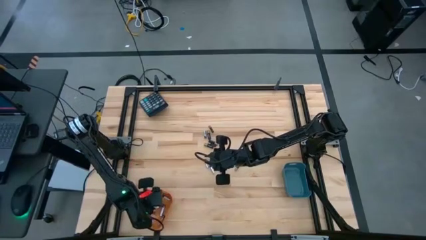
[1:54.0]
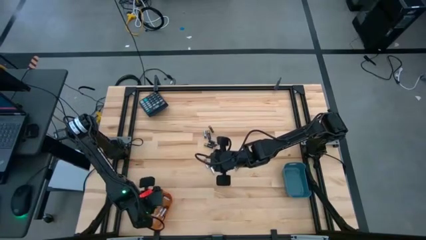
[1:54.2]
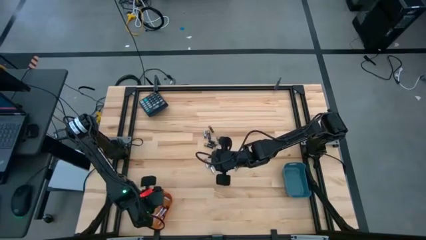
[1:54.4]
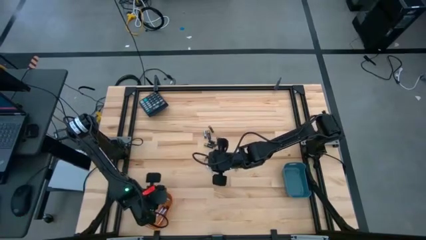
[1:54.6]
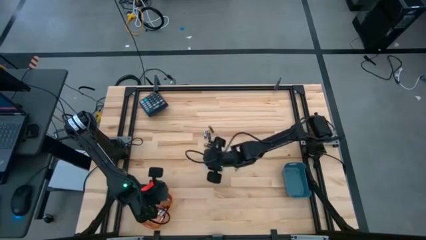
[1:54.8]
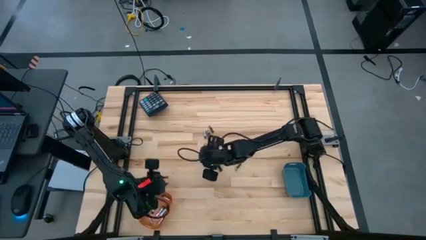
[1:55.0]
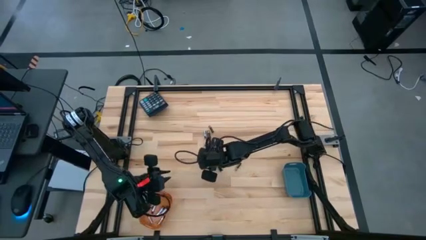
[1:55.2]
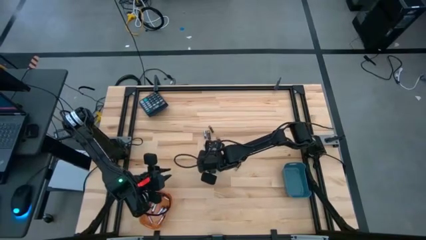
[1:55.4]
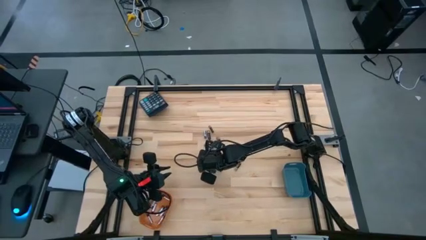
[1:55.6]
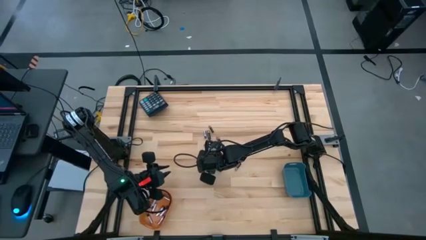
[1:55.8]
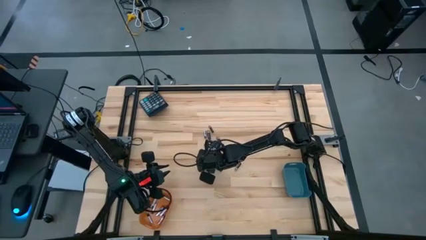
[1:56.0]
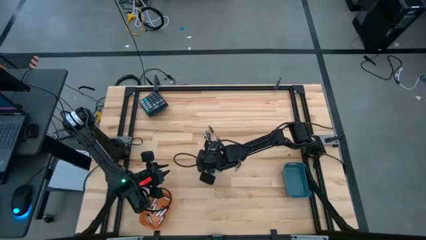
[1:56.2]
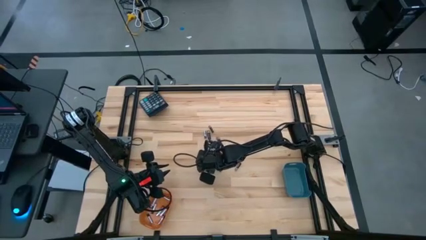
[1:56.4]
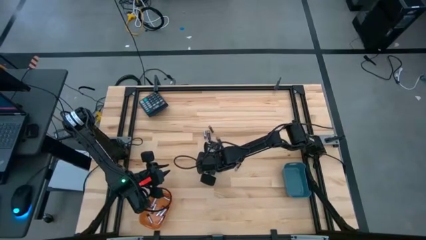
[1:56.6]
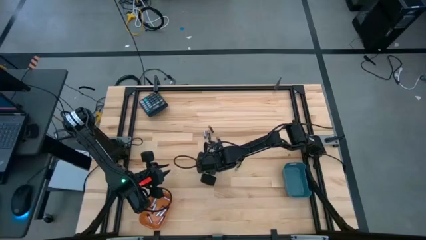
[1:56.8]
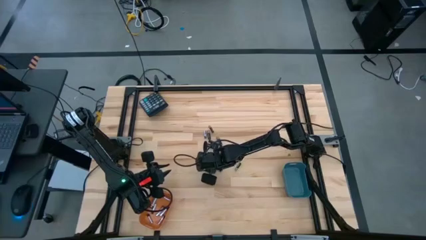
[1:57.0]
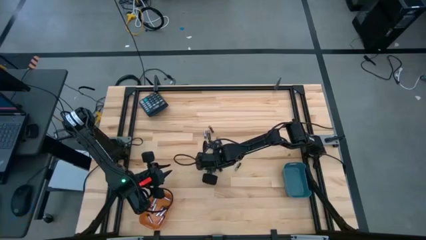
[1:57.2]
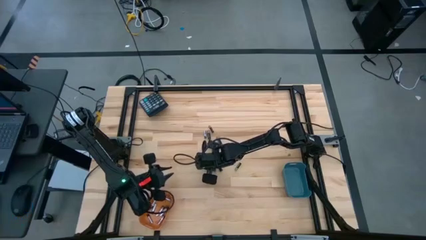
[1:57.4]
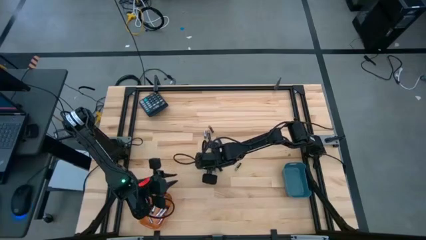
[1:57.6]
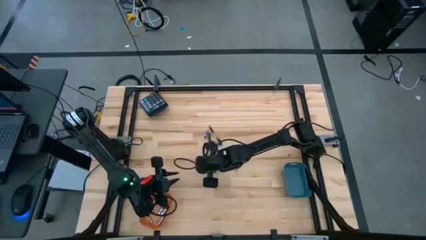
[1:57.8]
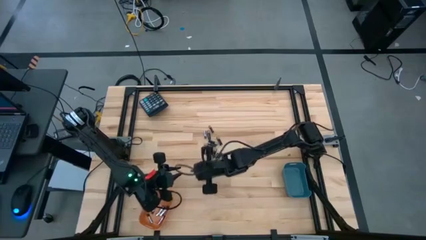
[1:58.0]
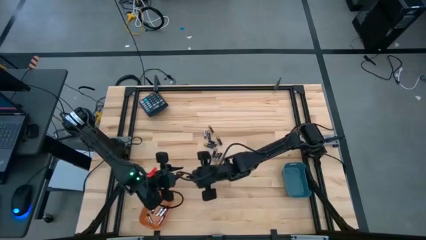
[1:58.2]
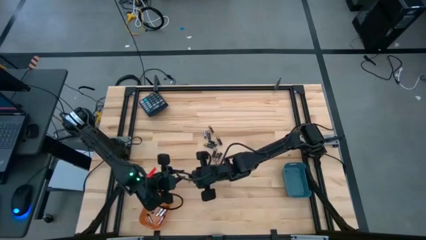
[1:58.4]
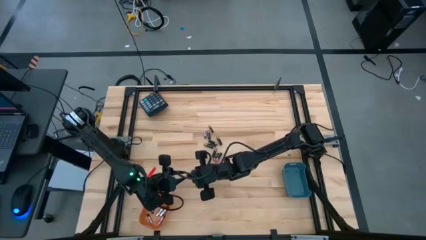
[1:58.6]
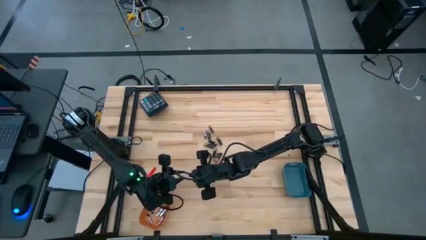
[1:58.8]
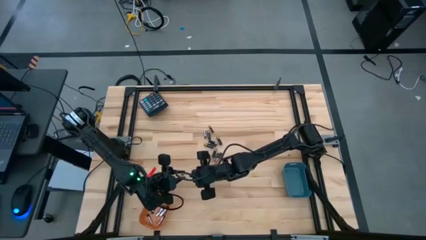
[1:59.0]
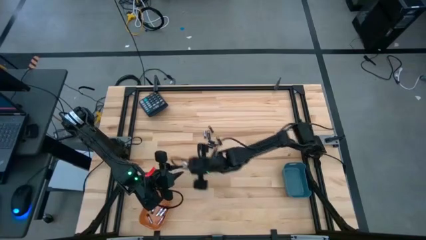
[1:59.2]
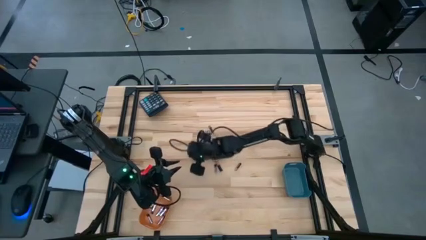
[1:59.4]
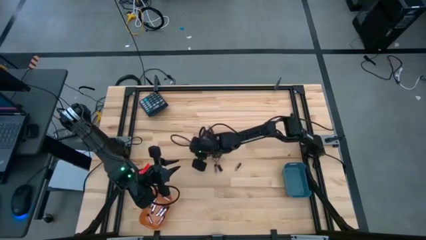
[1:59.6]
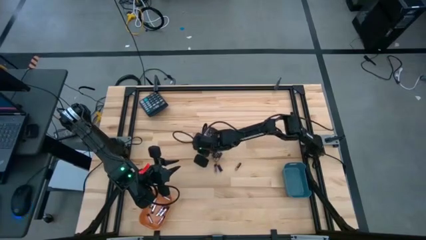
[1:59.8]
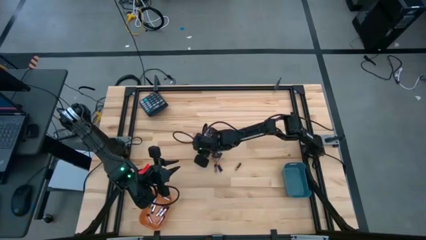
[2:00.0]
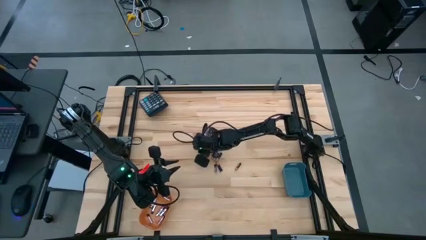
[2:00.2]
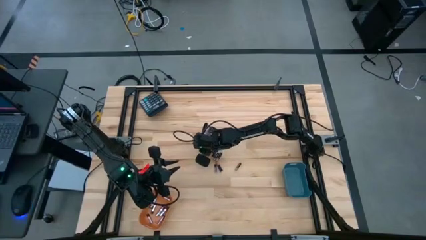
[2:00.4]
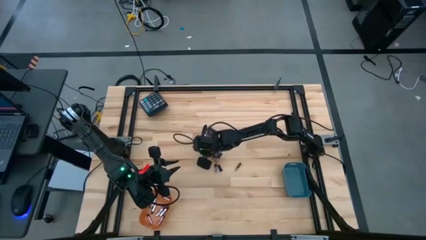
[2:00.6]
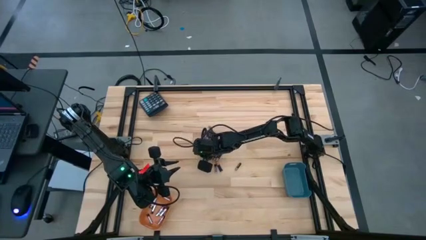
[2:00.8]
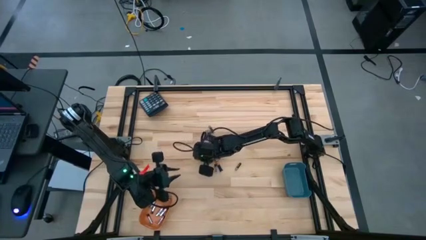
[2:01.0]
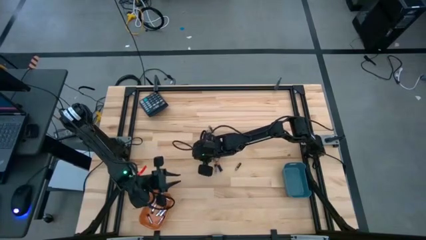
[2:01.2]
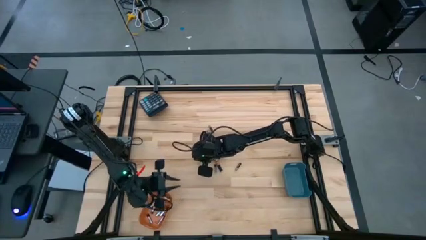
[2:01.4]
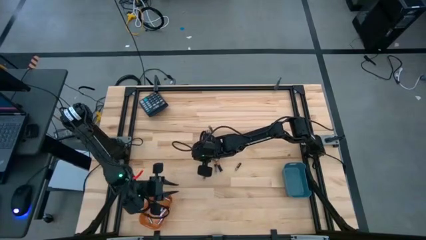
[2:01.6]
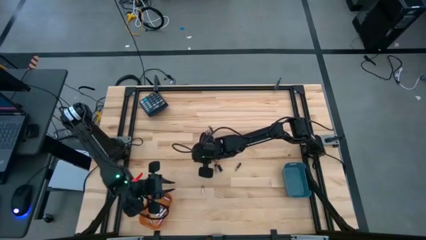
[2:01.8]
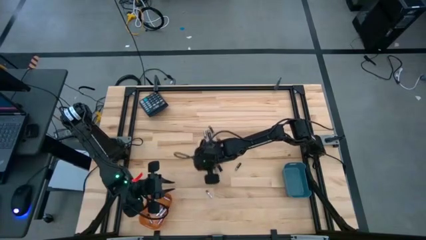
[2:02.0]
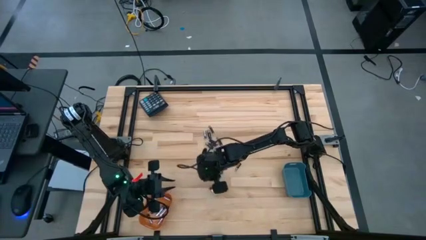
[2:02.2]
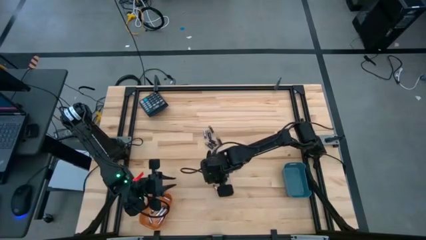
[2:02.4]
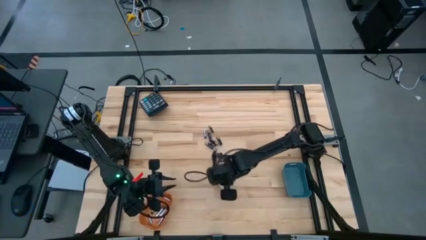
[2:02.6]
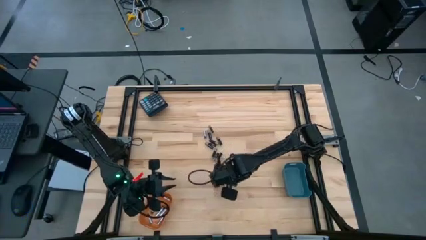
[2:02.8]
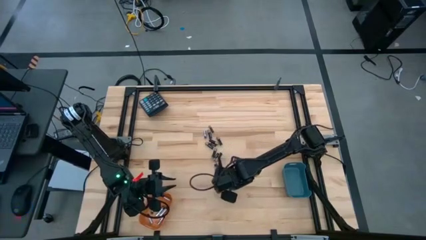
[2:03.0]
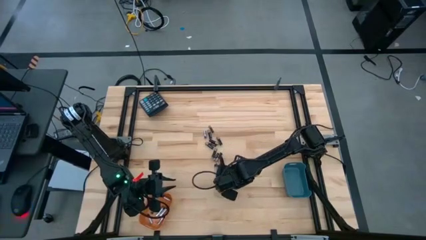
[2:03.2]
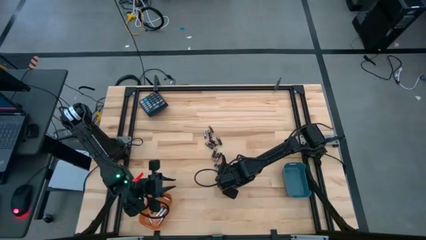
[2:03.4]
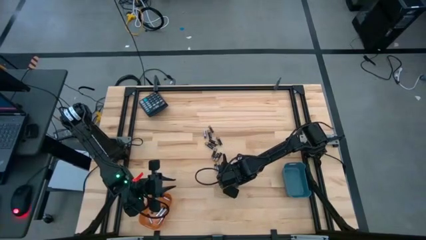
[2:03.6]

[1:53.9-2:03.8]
Task: Sort batteries
Put the silver battery into the orange bin

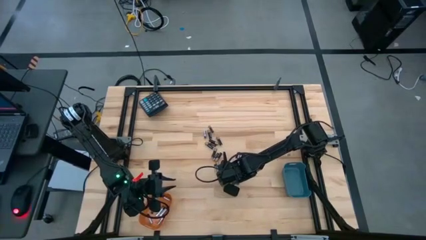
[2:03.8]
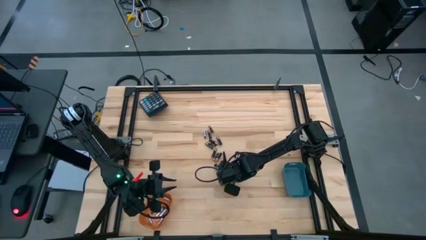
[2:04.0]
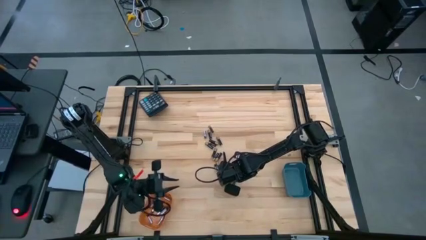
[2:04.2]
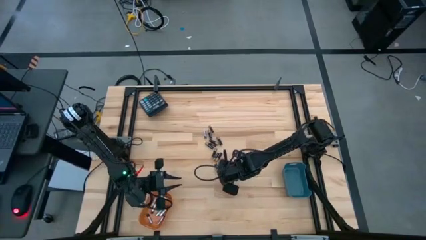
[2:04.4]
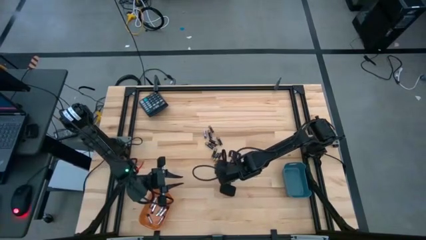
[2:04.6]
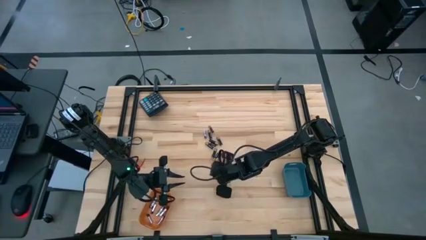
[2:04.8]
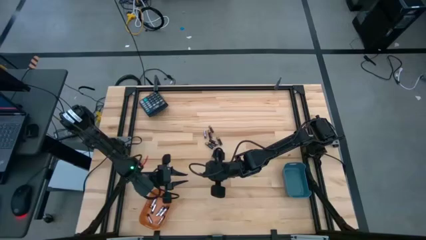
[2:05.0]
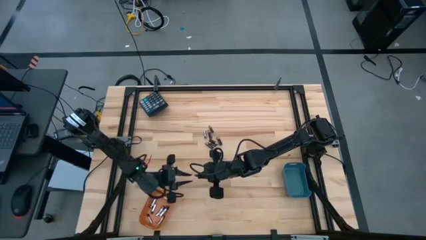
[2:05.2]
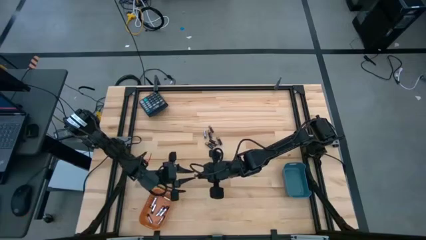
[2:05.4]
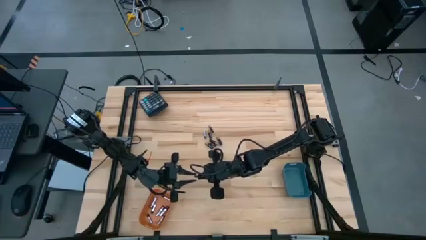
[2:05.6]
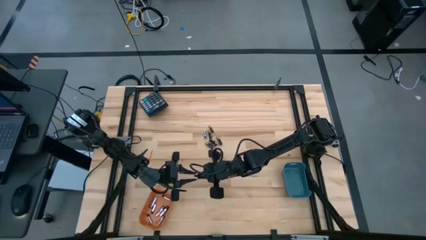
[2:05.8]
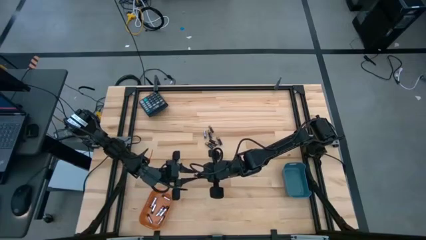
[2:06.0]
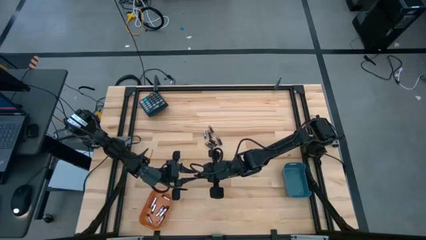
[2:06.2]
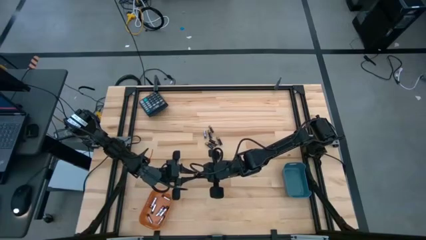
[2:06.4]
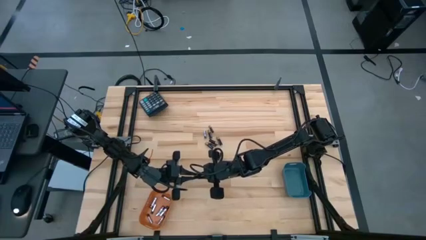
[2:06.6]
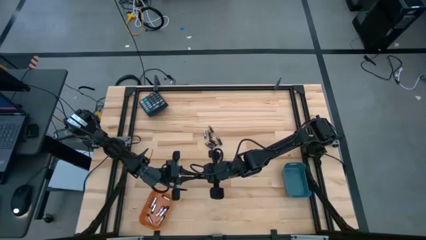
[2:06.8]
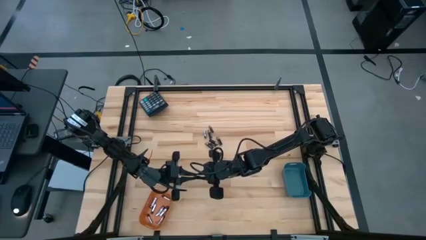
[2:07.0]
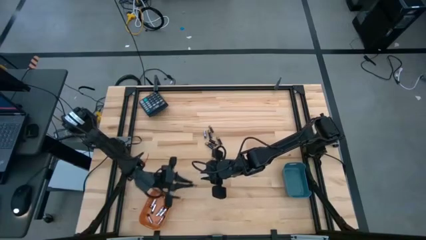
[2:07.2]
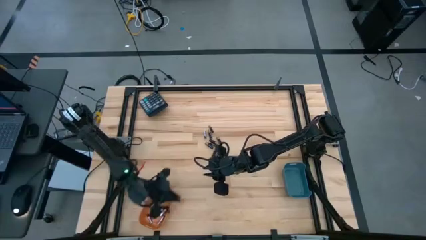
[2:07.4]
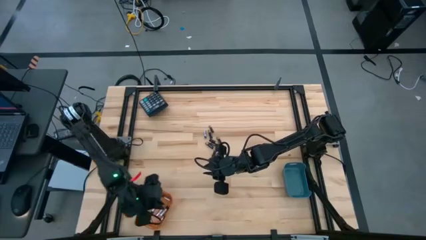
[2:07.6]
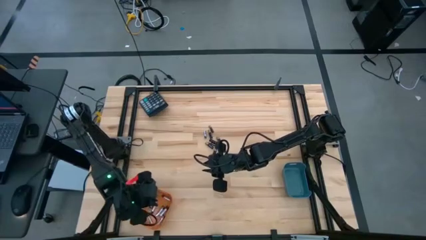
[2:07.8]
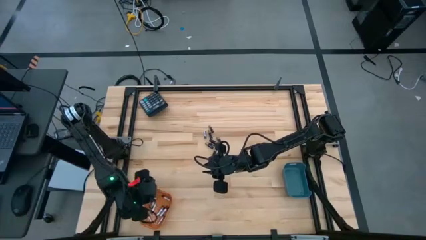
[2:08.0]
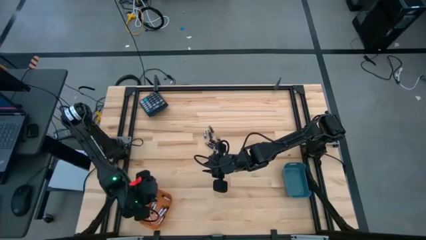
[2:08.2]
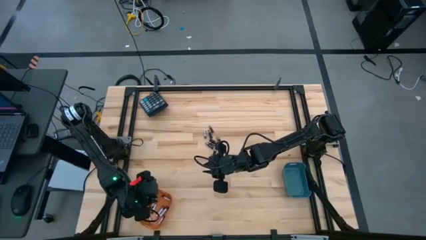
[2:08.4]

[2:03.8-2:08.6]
Put the silver battery into the orange bin

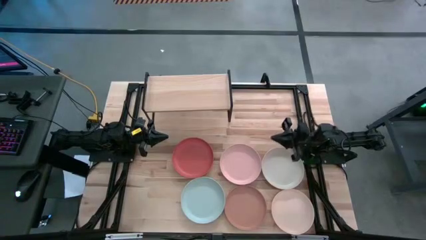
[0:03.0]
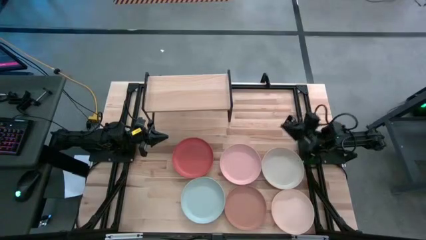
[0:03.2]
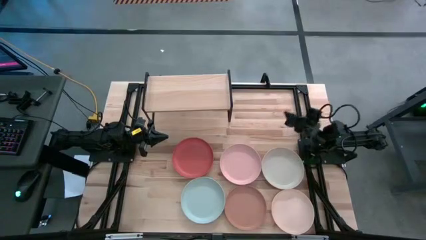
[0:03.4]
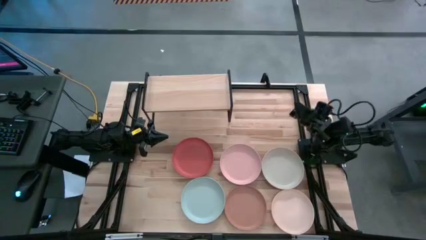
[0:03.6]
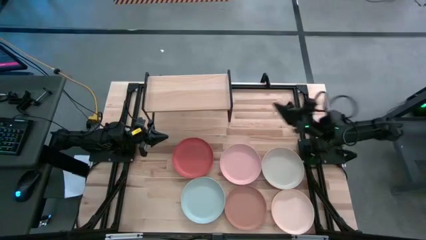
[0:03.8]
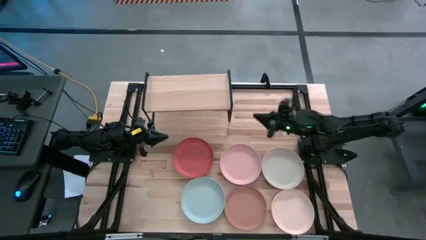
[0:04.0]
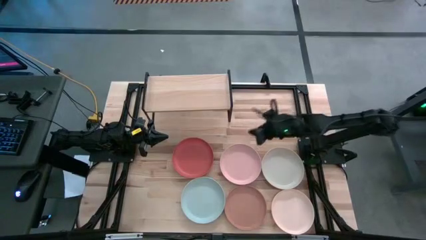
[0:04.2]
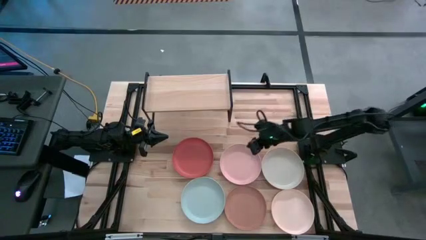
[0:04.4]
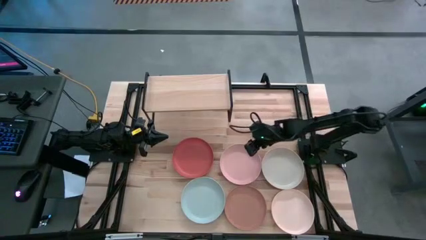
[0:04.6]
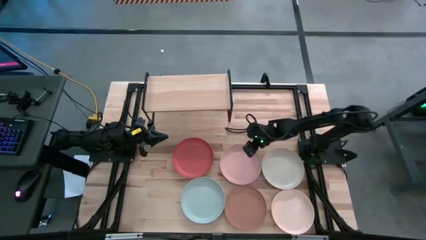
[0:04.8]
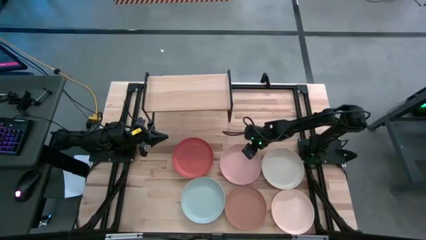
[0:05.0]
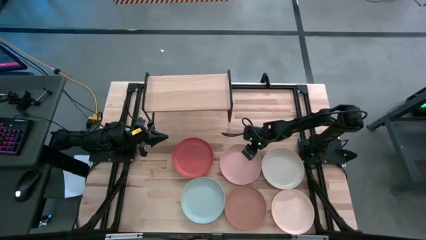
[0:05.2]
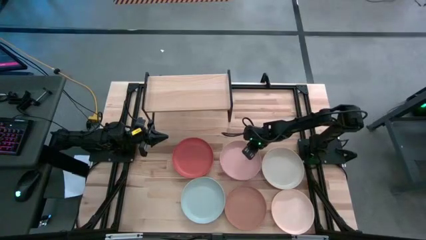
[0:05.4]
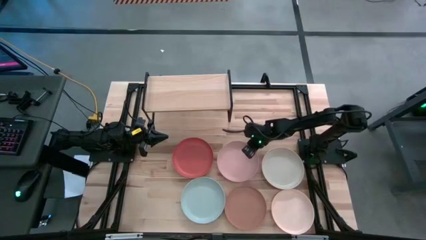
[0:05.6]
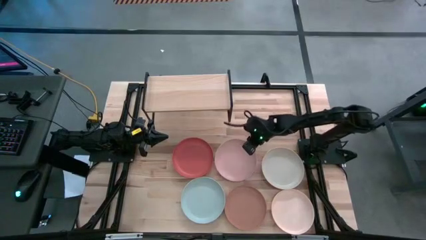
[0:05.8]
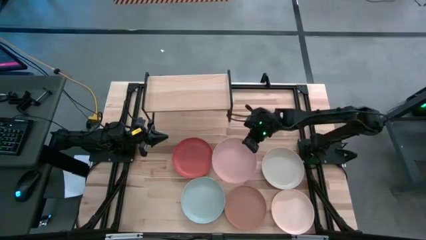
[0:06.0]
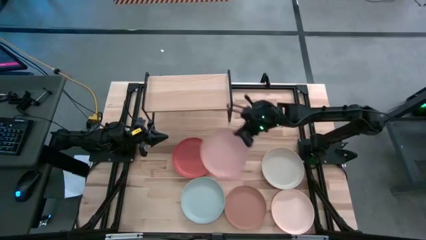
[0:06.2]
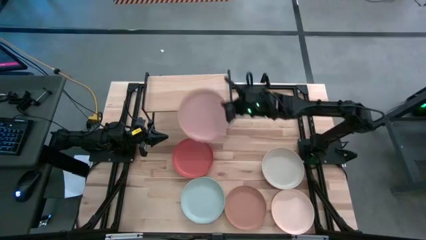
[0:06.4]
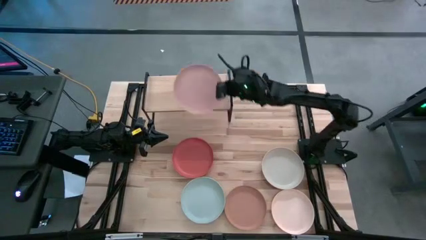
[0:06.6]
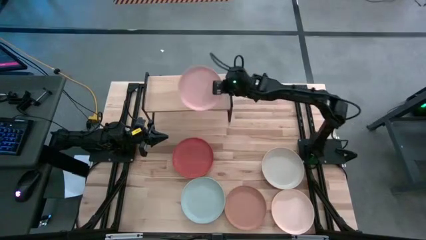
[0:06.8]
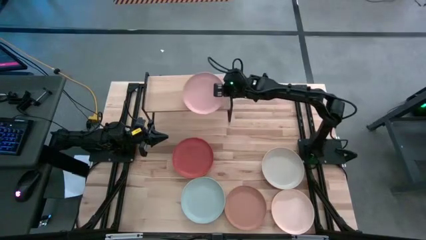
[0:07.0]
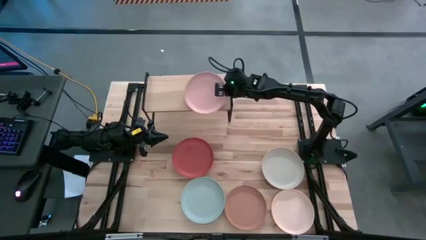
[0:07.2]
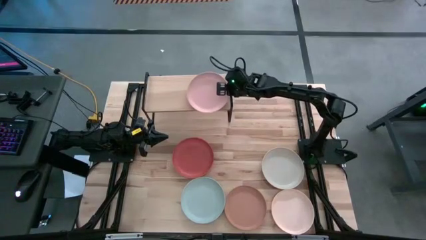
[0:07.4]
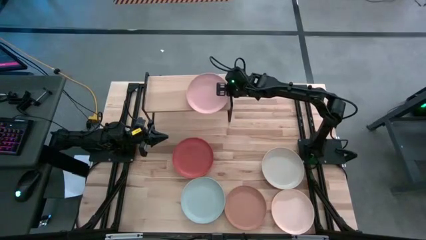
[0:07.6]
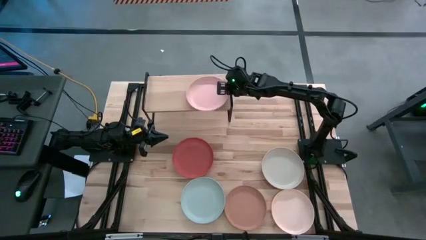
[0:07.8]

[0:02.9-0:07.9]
Task: Place and stack plates onto a shelf
Put the pink plate on the shelf
